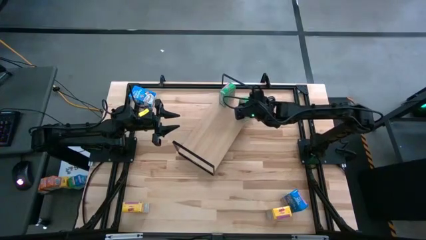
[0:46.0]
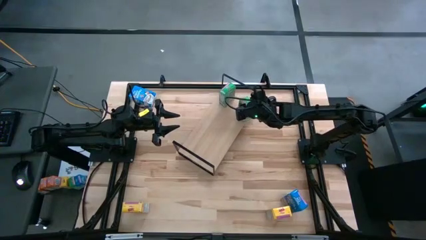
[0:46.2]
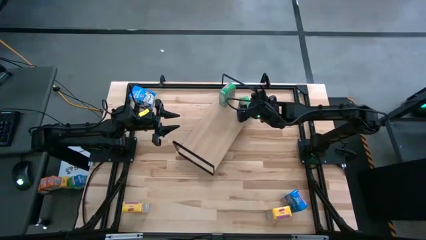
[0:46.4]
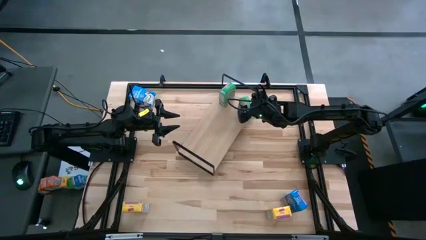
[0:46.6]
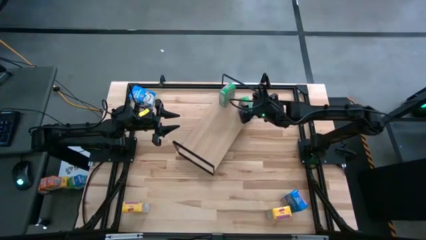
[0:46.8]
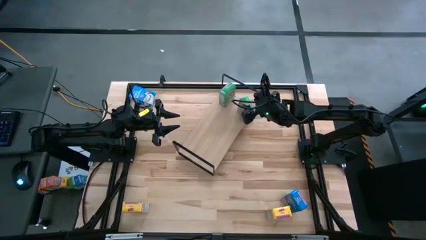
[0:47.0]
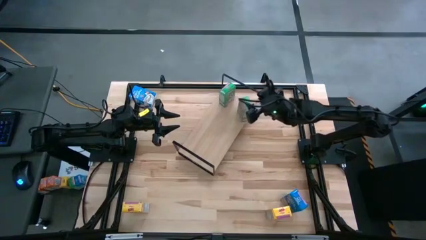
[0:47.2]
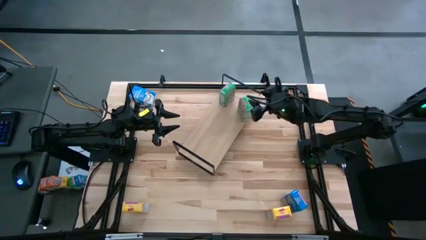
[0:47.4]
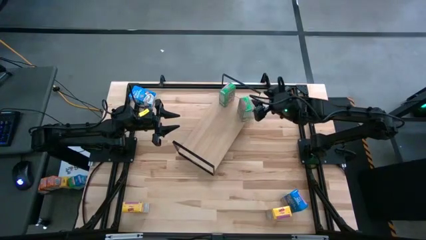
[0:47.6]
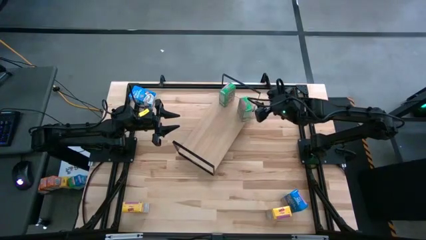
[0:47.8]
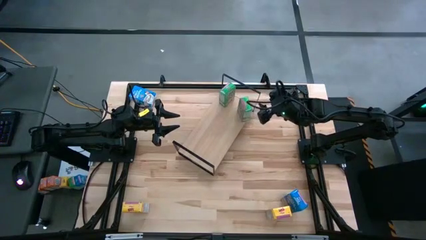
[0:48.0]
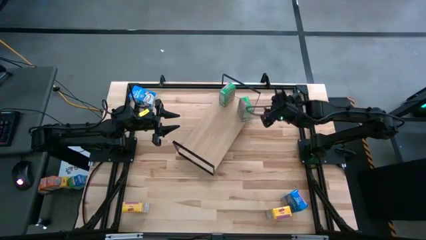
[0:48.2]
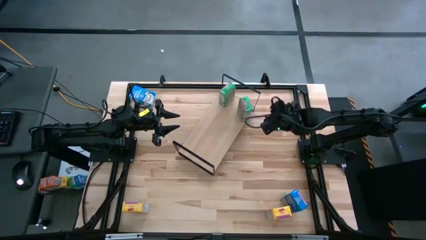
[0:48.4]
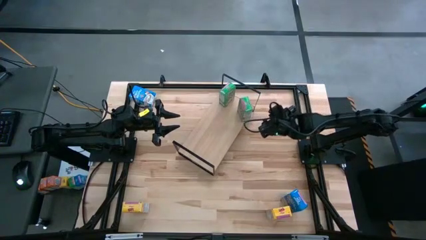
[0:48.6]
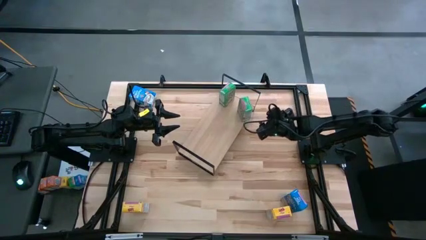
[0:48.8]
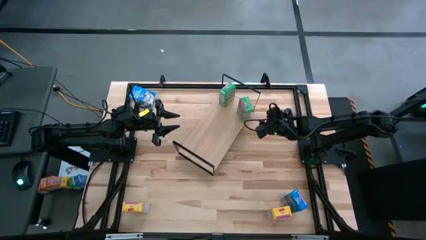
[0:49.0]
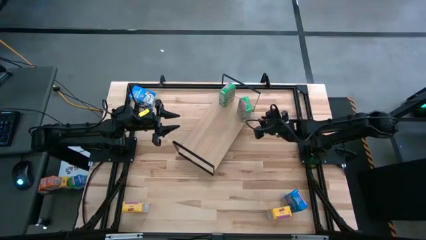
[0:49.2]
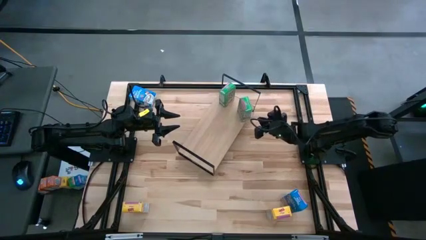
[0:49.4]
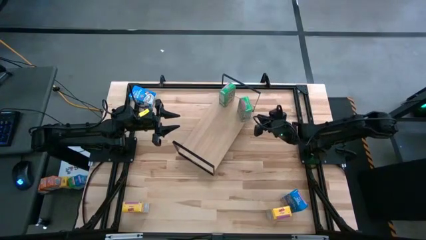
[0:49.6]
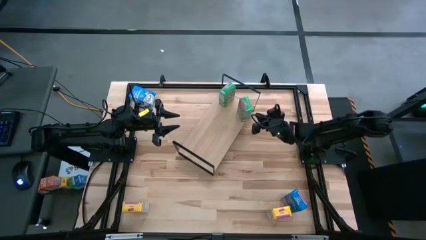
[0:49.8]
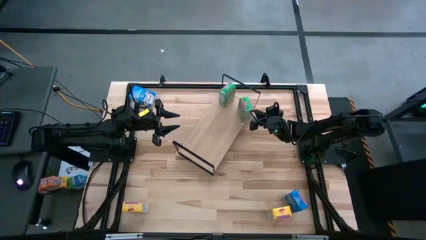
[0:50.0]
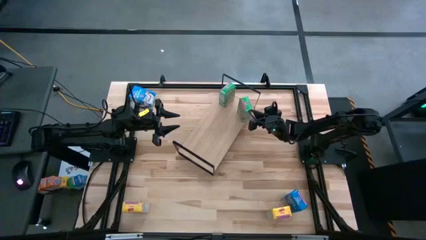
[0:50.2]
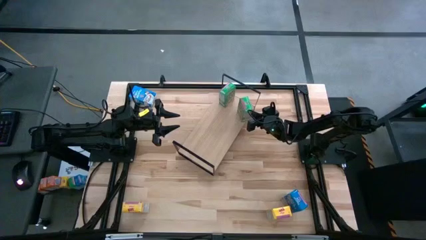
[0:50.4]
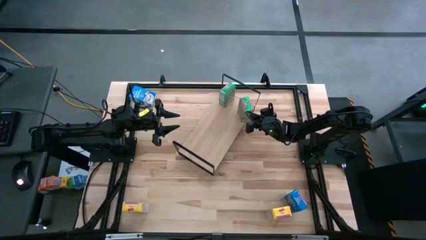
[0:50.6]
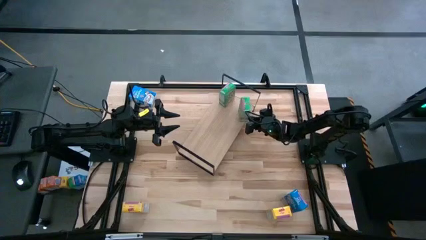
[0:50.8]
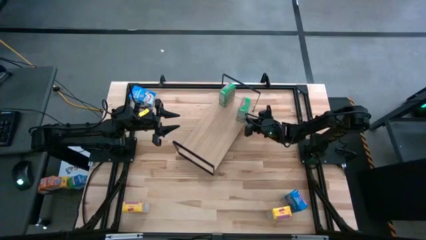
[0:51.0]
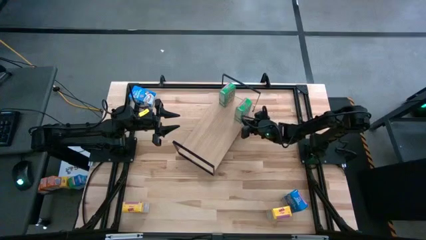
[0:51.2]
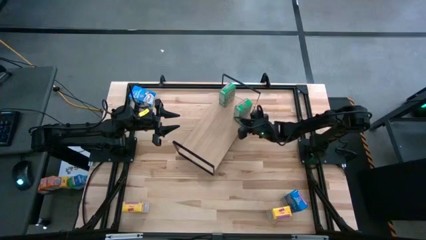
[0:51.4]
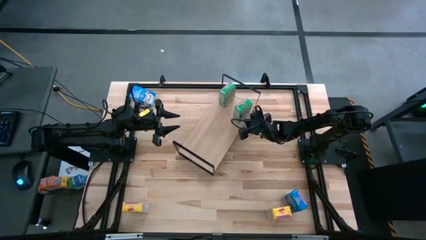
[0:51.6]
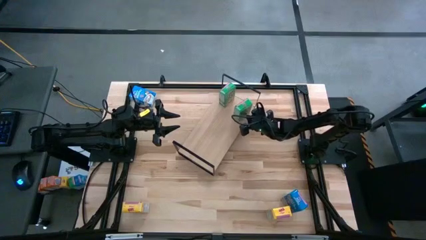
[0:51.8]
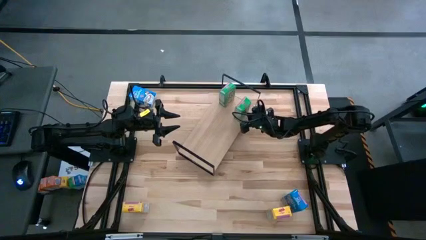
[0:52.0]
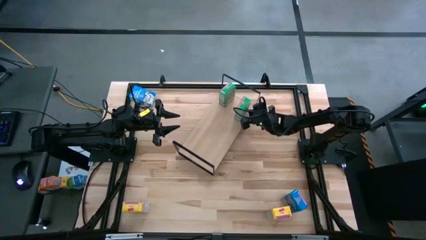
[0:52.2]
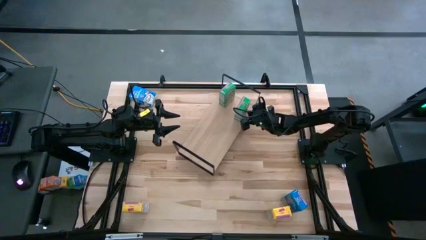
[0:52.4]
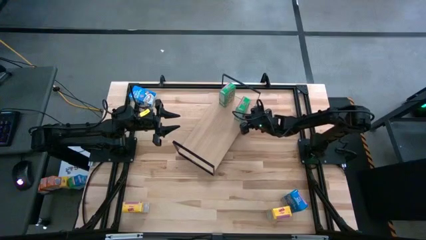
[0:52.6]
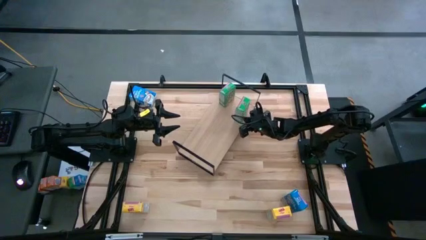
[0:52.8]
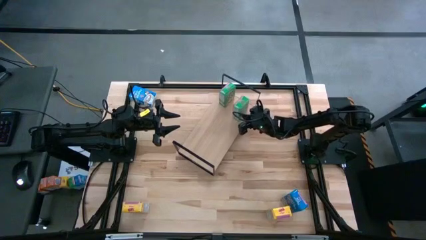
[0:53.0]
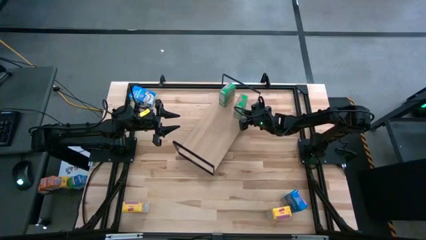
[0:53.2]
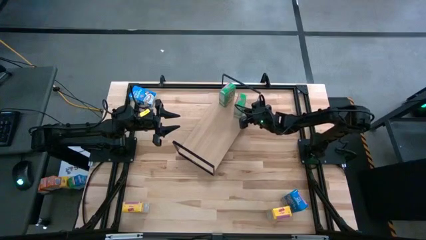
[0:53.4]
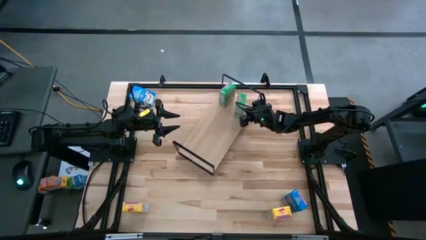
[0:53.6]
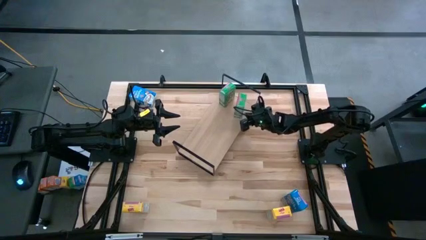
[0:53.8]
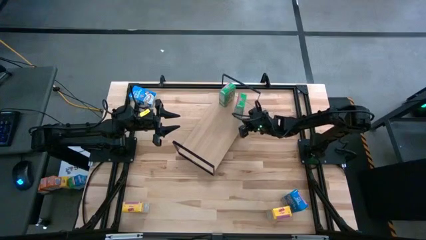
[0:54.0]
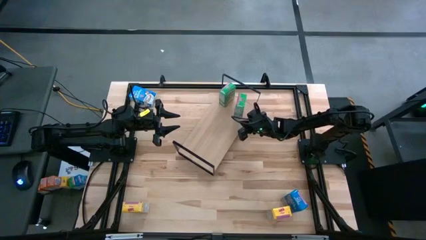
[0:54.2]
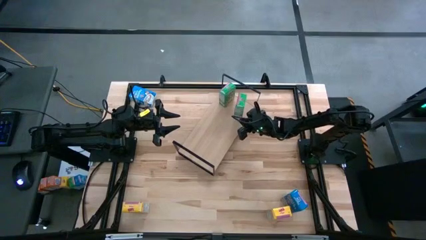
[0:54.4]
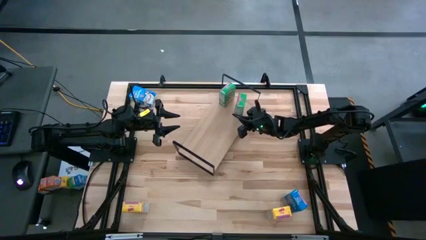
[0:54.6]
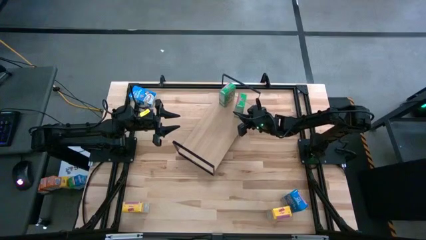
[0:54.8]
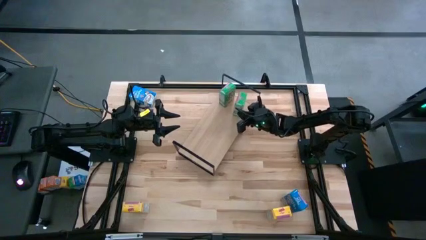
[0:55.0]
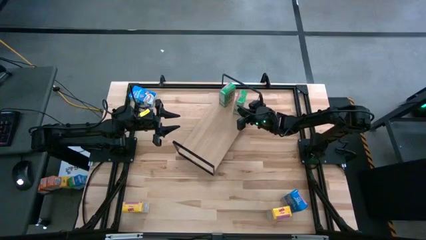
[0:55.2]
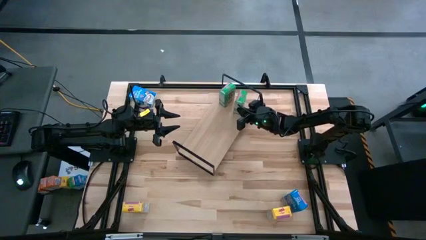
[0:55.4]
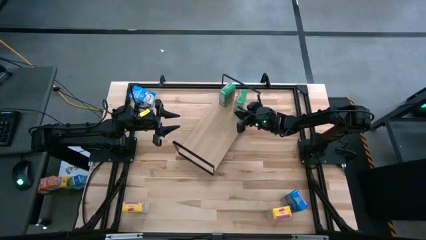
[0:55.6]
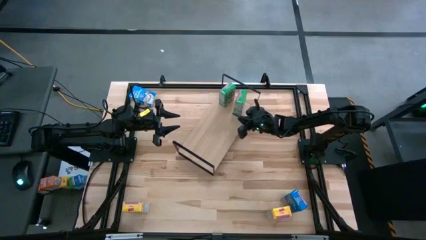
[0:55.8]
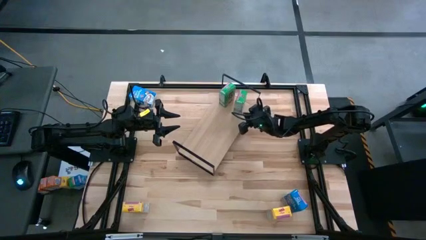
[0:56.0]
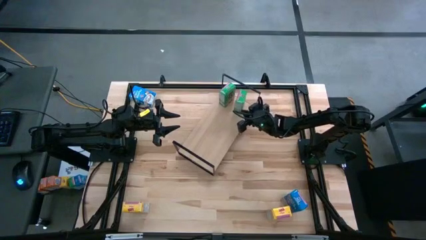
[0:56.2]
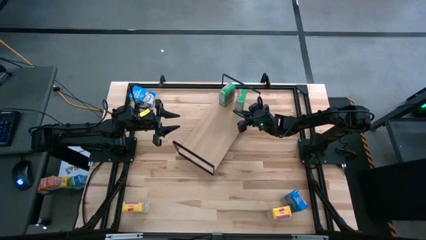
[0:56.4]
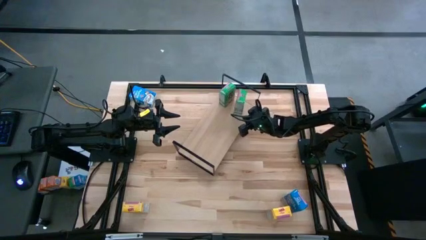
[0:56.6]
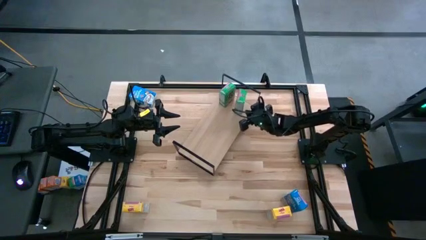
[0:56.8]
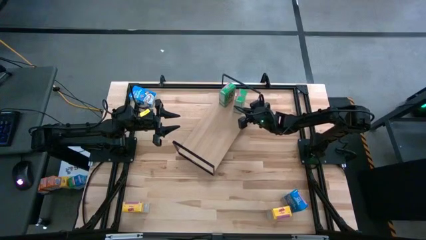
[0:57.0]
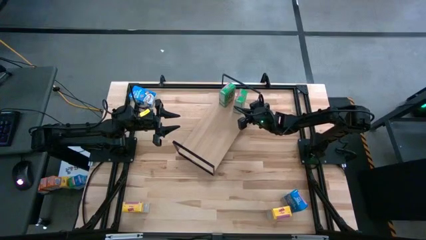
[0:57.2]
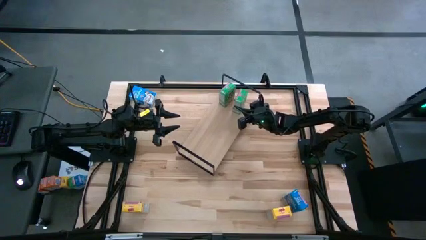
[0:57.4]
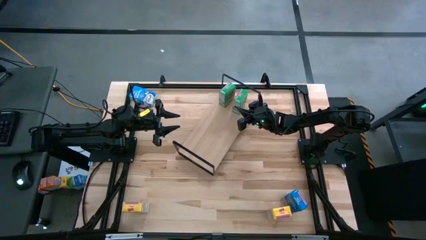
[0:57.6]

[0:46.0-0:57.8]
Task: Stack cereal on shelf
Put the green cereal box aligned with the other green cereal box on the shelf

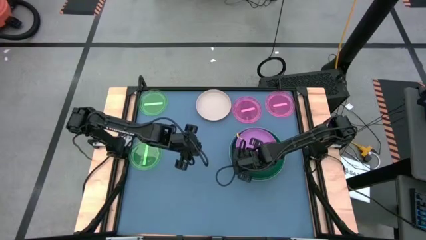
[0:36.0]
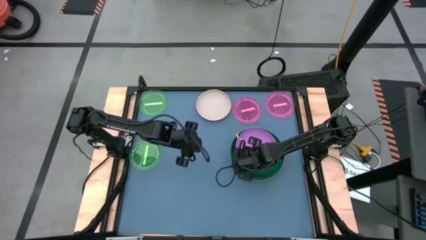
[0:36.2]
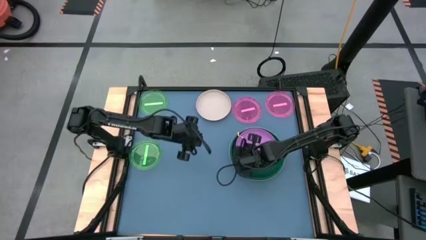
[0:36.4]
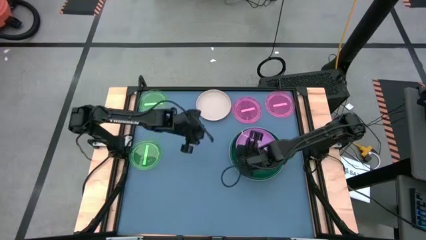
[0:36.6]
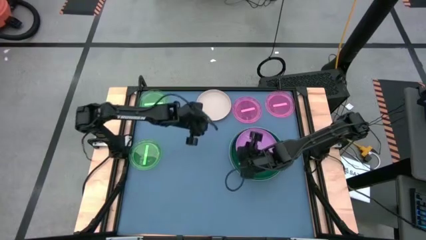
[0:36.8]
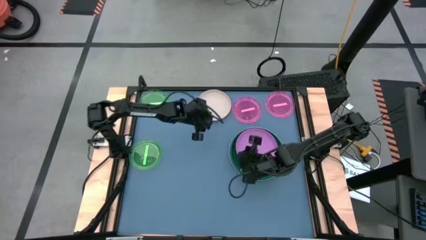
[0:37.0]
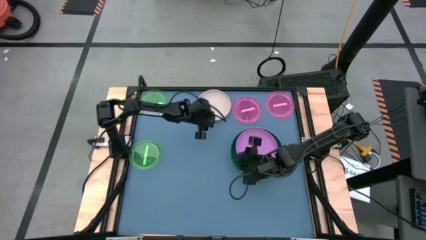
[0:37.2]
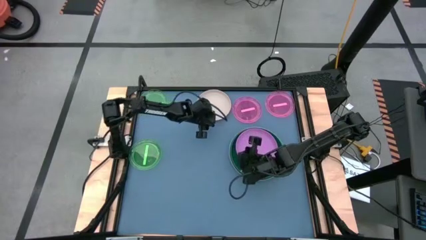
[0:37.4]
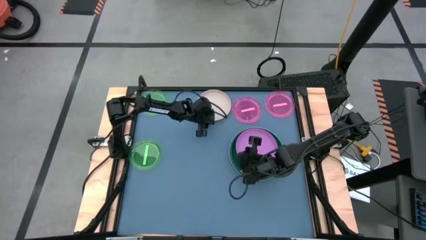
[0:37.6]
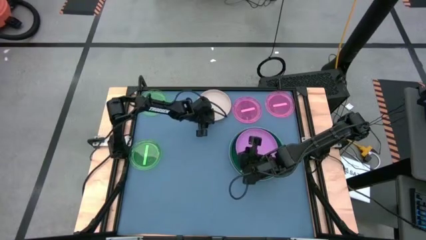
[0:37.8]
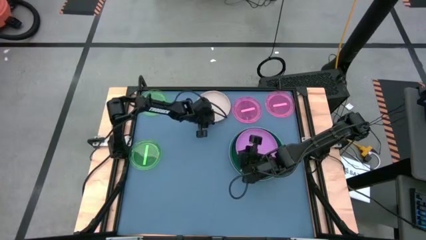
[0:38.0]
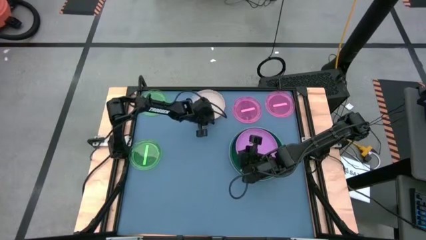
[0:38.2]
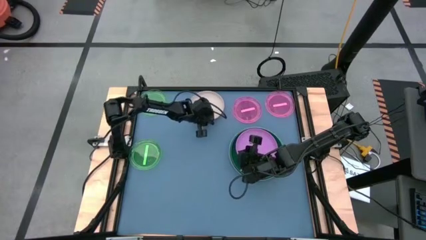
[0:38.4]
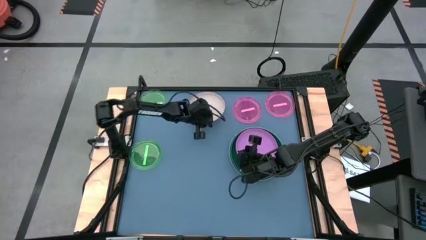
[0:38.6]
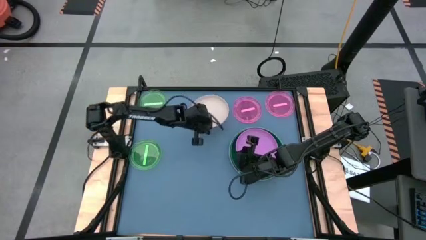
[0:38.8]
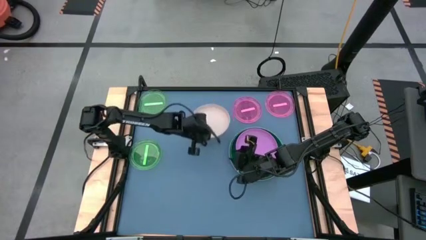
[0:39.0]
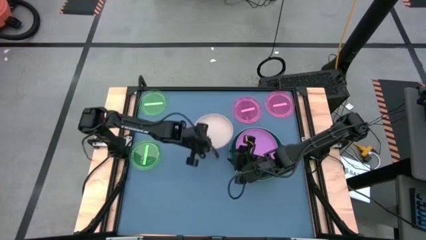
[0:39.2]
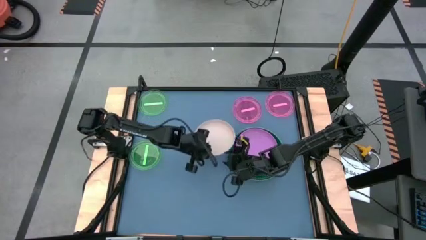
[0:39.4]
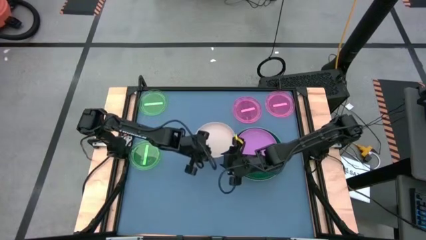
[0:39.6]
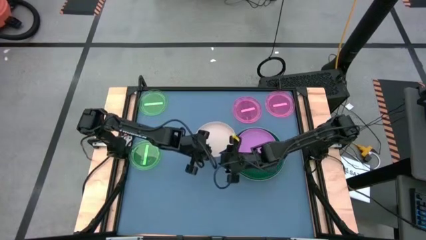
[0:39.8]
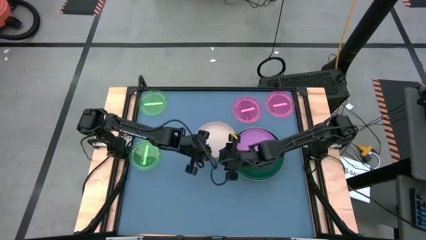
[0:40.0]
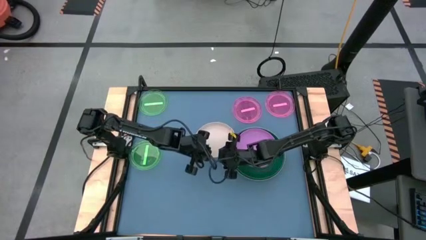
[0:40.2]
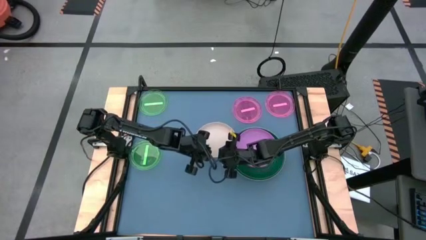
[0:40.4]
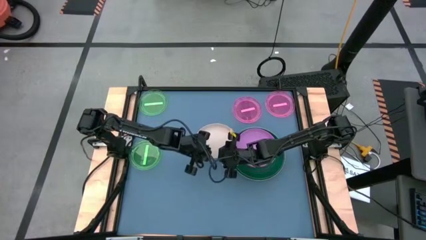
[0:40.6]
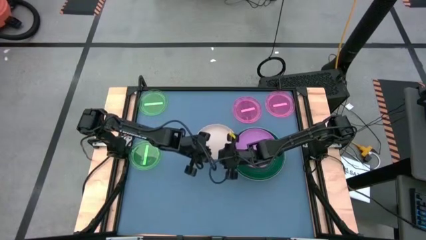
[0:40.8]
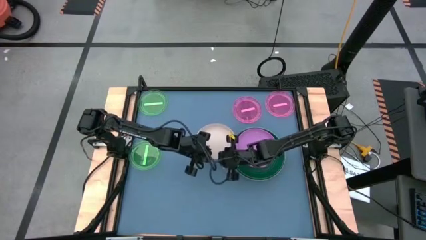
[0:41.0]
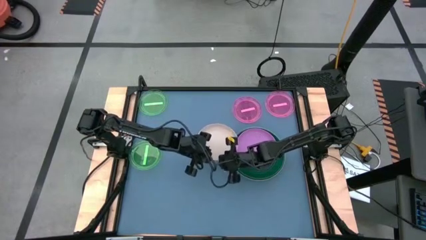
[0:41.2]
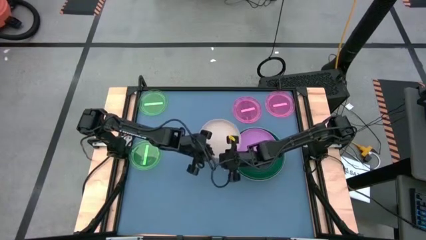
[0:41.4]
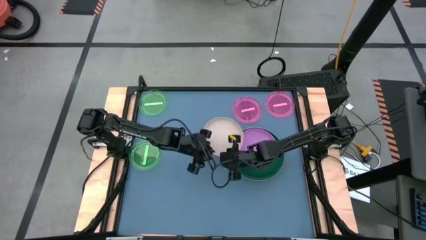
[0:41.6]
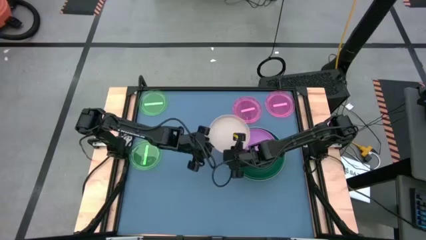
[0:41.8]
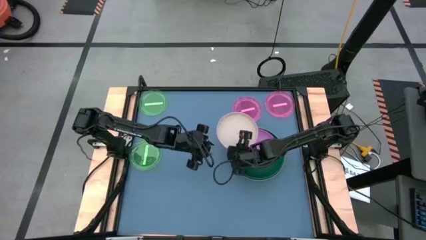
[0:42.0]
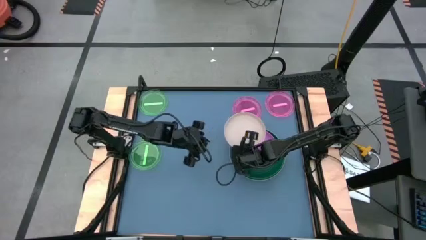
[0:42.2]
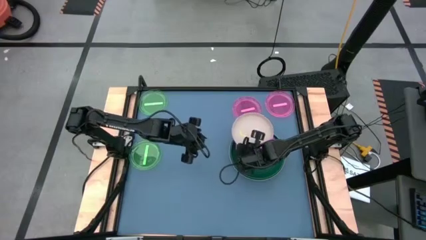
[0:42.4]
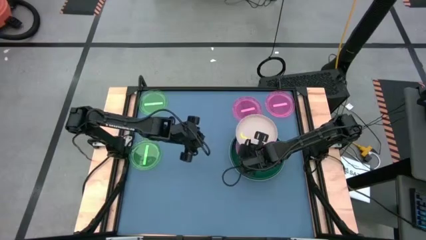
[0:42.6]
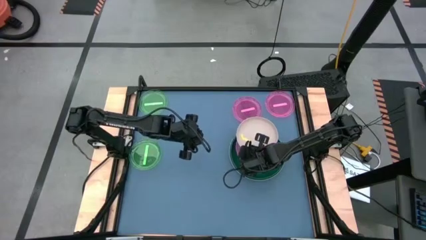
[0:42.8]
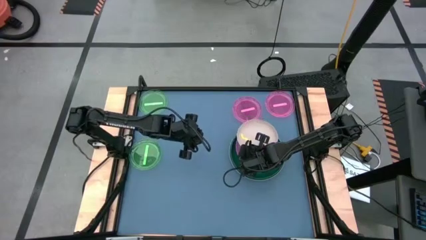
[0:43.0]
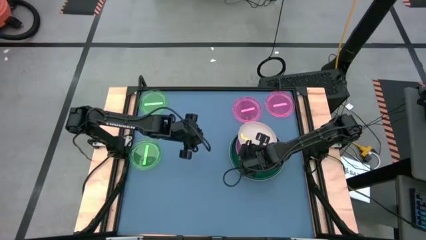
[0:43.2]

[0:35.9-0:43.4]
Task: Stack plastic plates
Stack the white plate on top of the violet plate
